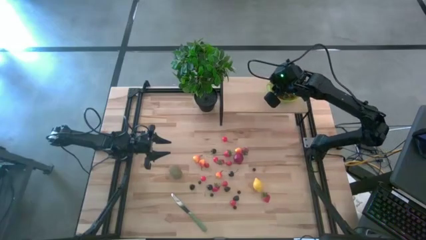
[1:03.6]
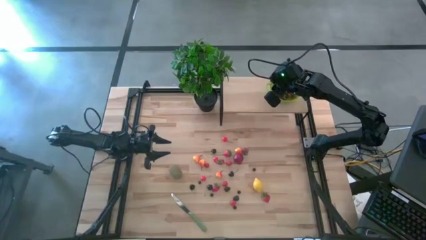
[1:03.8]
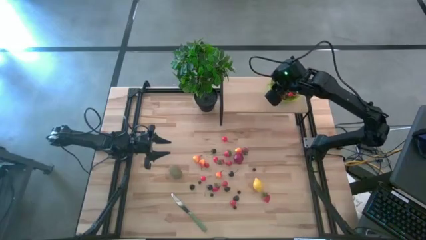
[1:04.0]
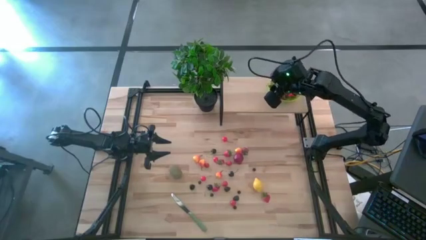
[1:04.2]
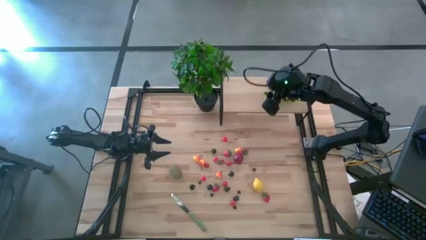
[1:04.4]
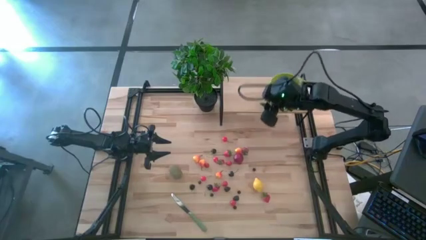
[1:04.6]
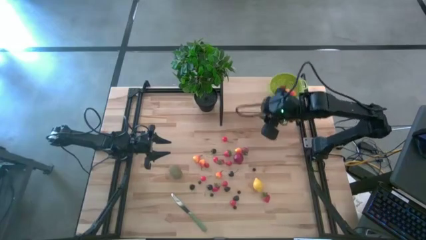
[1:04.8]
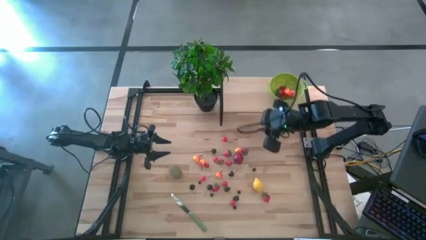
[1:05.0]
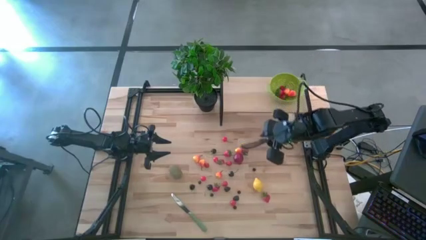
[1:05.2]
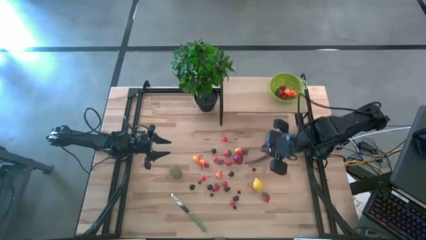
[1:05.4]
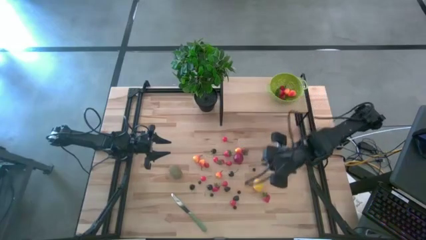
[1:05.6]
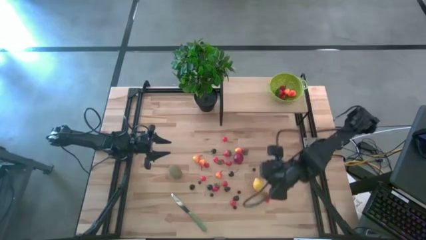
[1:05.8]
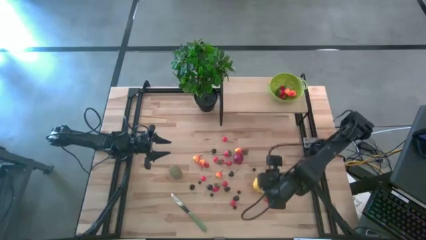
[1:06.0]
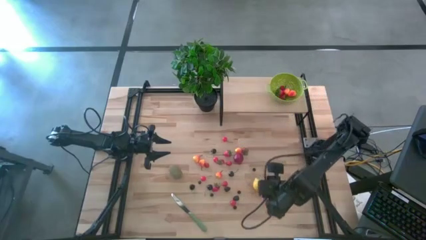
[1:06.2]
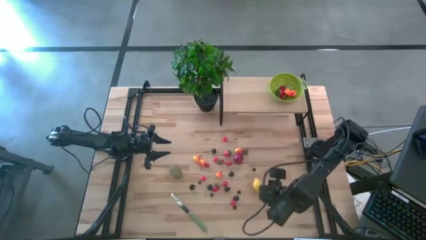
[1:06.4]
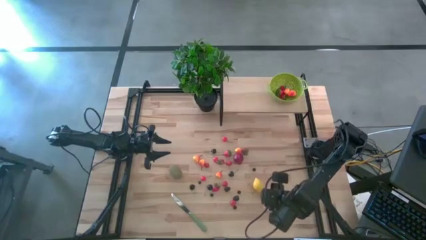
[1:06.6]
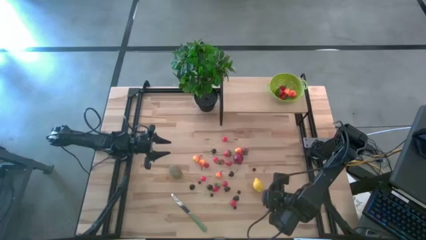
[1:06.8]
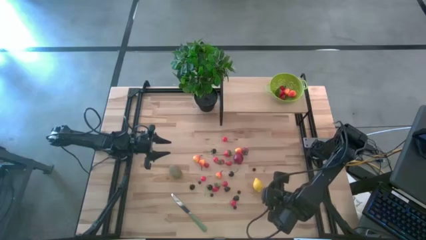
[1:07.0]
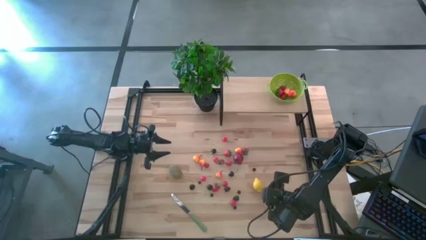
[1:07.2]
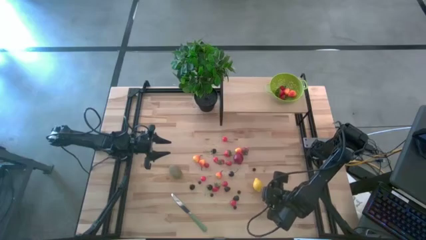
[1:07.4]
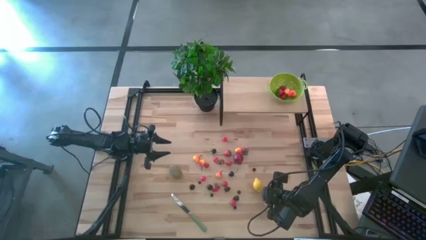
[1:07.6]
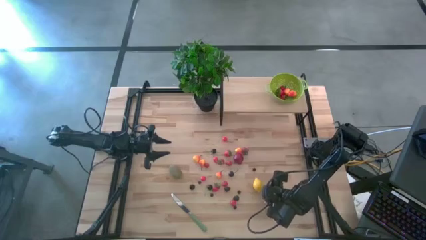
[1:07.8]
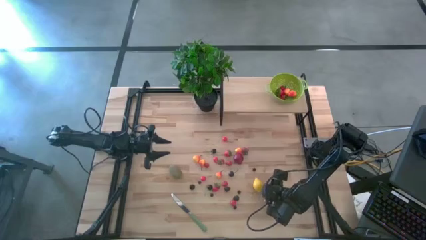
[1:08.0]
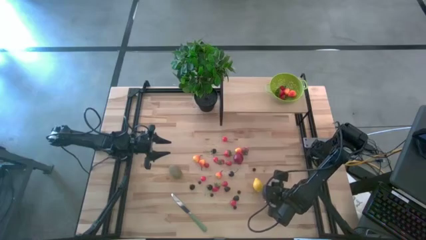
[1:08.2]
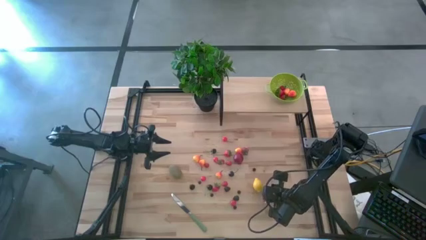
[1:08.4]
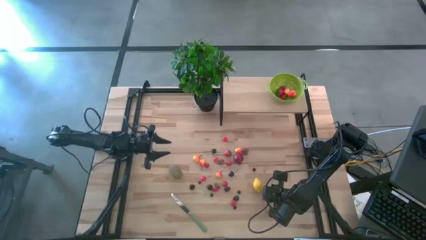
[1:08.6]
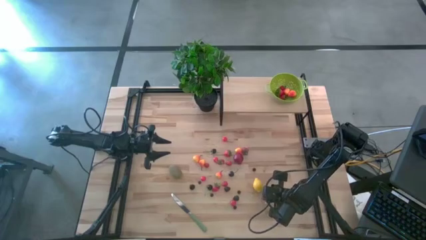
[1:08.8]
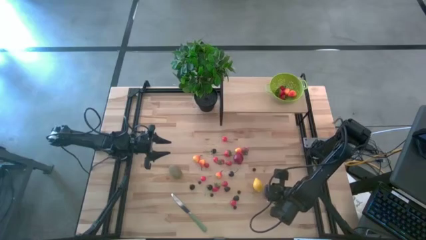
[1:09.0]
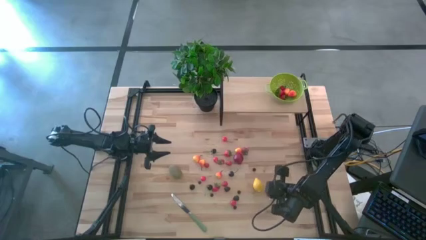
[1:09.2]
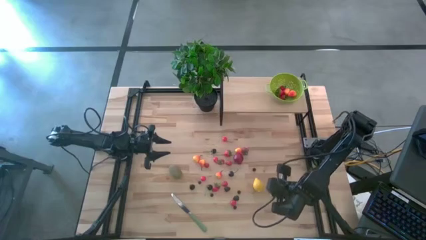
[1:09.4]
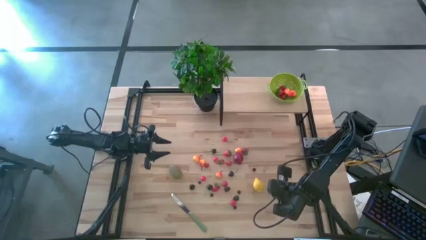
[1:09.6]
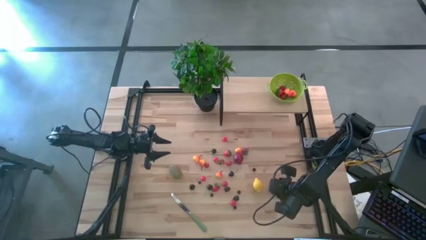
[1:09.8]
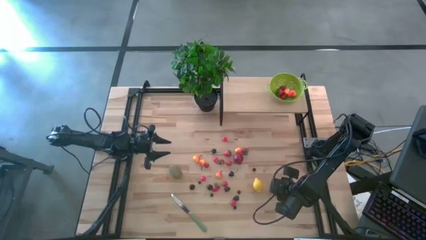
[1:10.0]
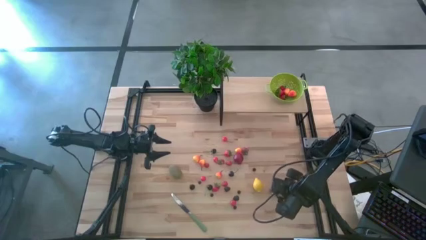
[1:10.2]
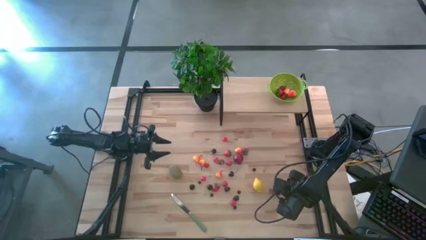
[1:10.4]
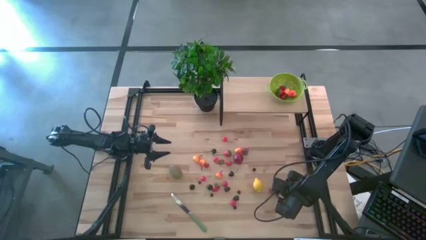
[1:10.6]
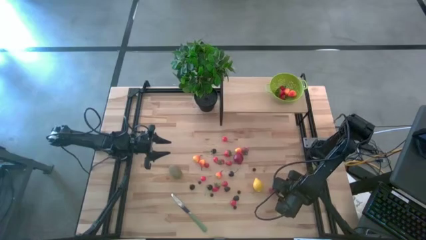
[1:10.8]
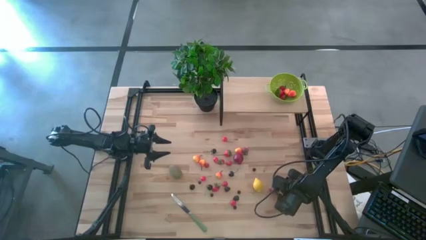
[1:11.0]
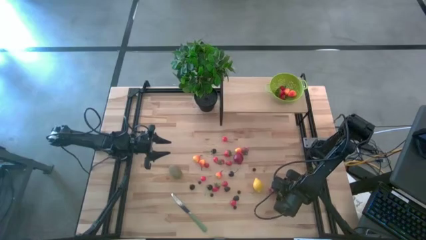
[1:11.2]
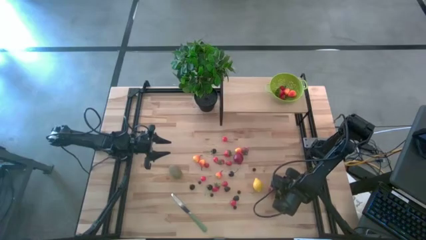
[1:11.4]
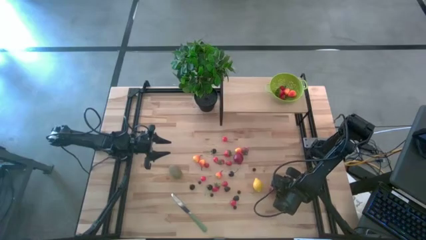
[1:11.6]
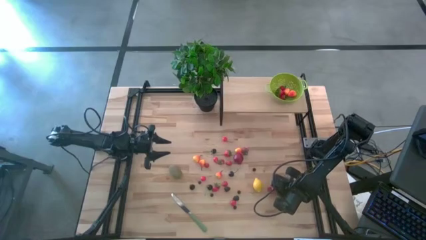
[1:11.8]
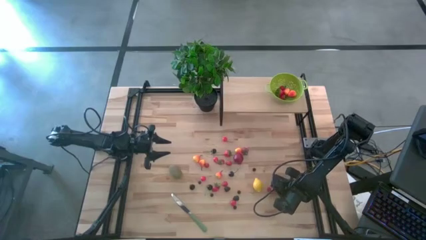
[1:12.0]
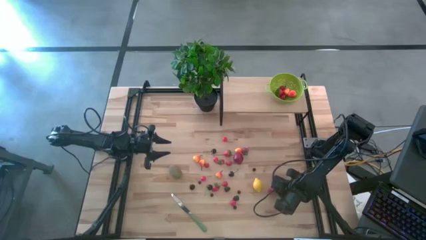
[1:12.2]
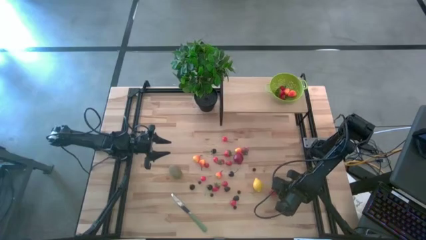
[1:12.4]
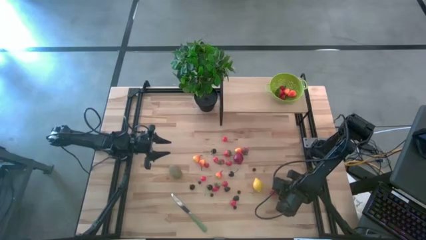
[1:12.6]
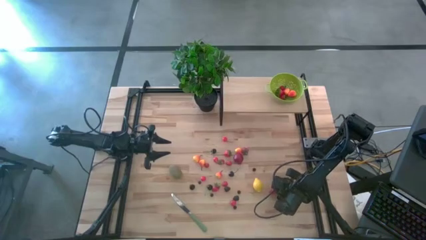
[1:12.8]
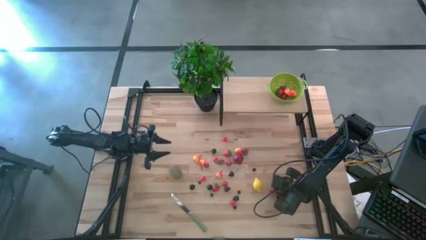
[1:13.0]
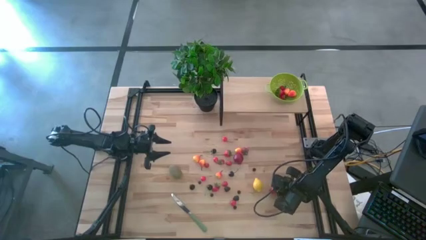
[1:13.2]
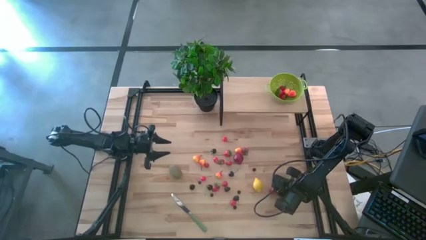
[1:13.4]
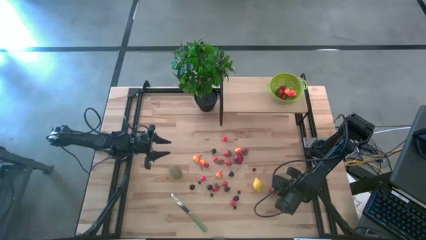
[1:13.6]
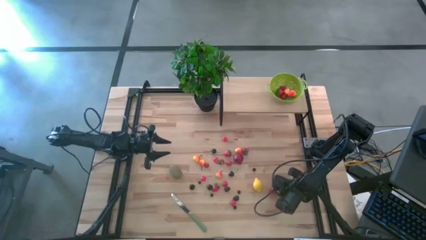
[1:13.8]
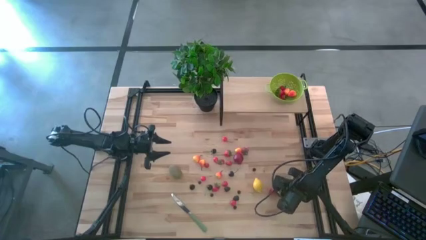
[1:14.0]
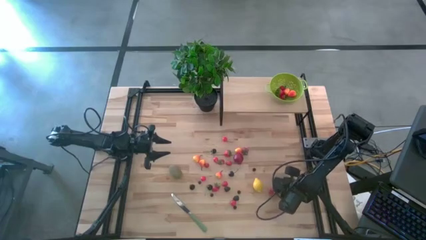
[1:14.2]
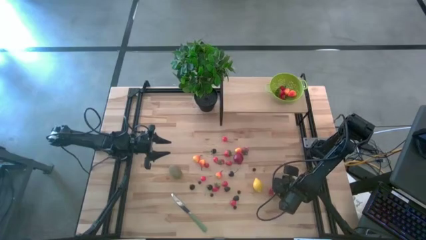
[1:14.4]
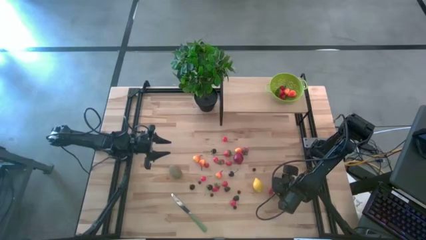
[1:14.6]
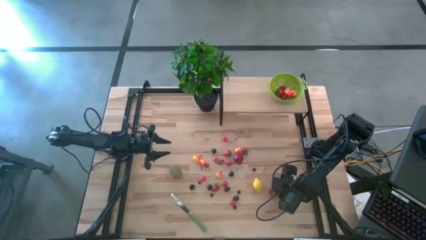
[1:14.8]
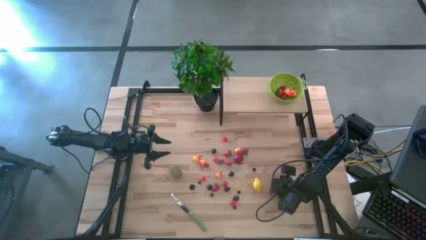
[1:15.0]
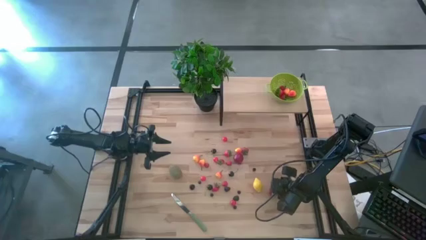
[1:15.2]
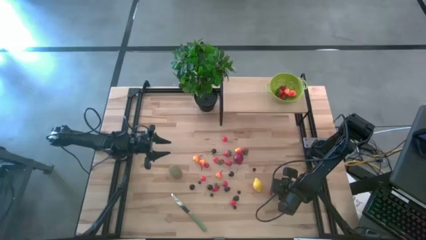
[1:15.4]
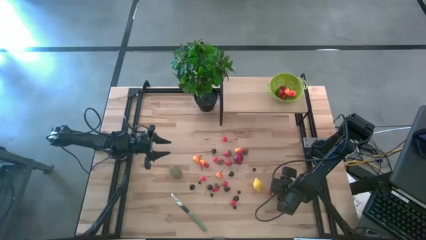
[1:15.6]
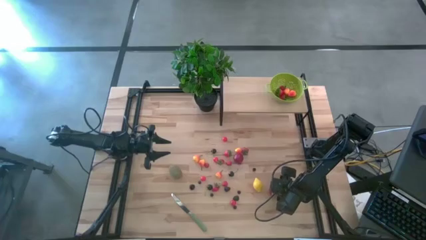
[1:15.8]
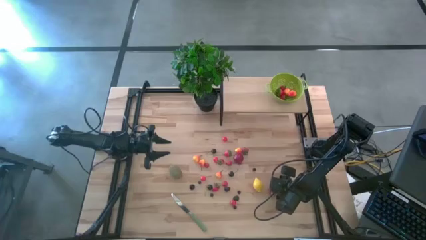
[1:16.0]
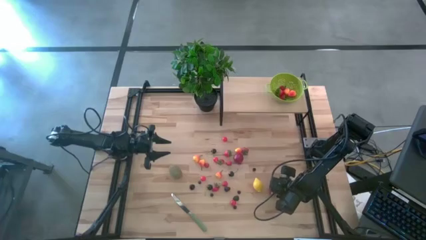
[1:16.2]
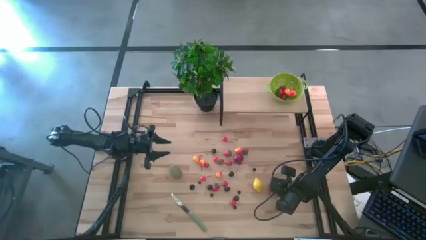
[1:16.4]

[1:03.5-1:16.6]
Task: Pick & Place Fruit
Put the strawberry into the green strainer bowl on the shelf

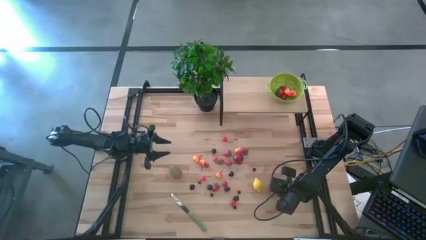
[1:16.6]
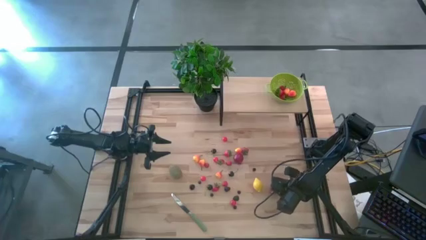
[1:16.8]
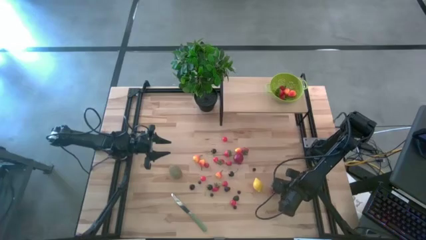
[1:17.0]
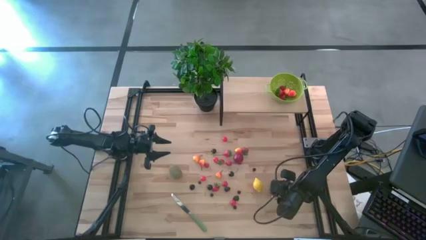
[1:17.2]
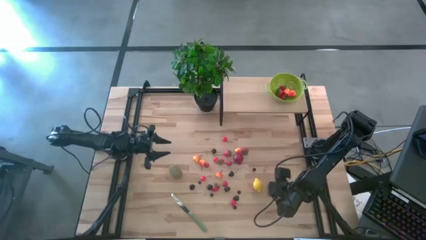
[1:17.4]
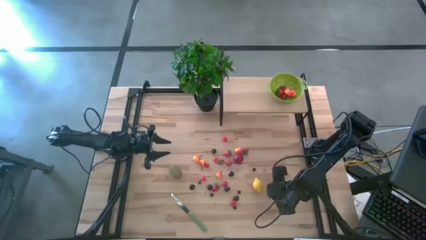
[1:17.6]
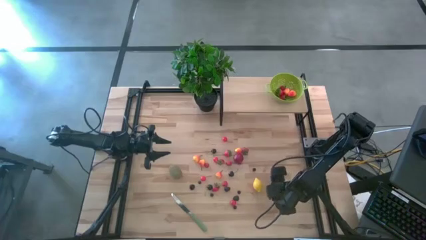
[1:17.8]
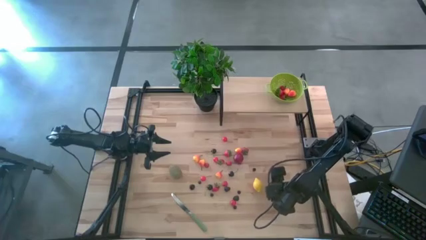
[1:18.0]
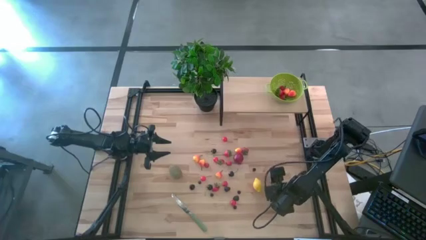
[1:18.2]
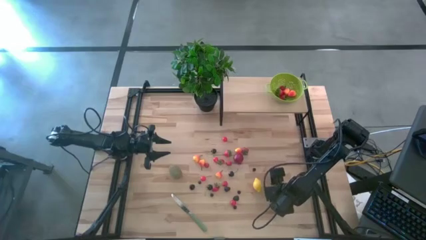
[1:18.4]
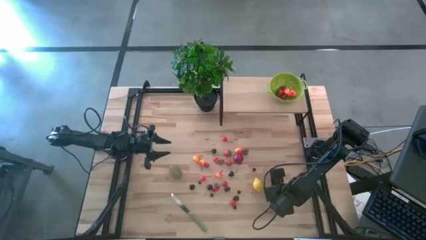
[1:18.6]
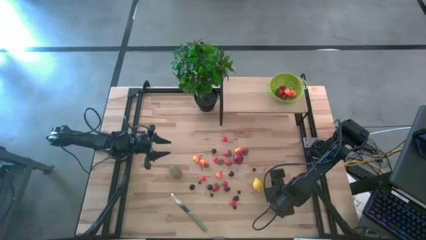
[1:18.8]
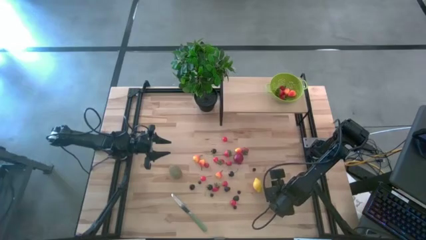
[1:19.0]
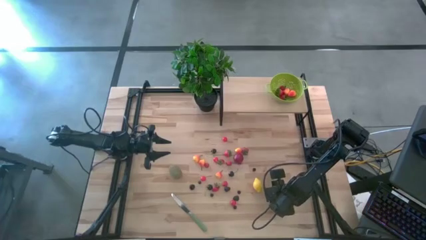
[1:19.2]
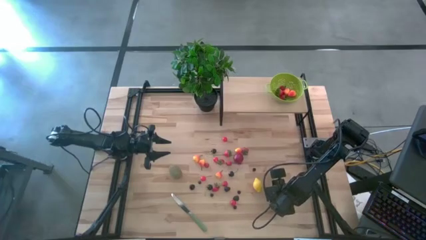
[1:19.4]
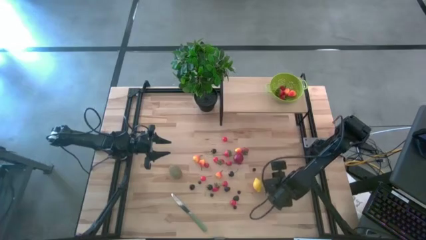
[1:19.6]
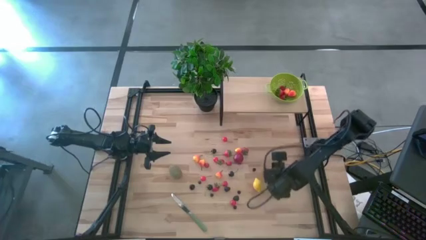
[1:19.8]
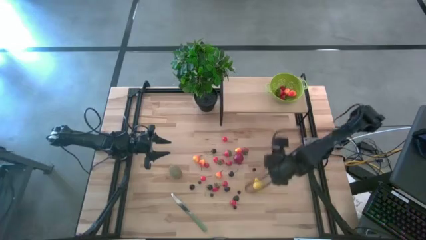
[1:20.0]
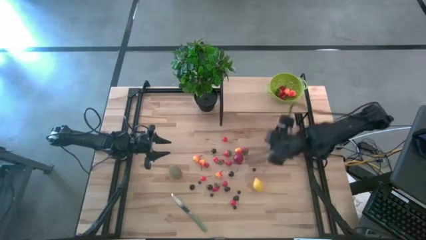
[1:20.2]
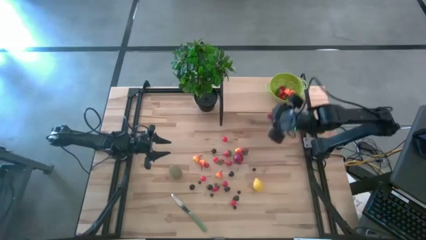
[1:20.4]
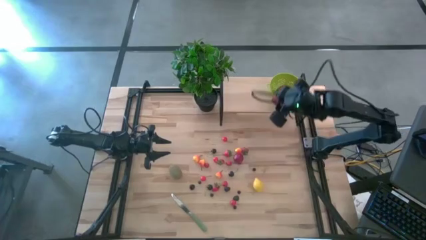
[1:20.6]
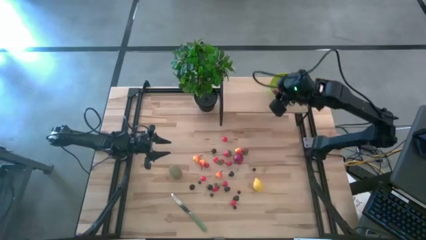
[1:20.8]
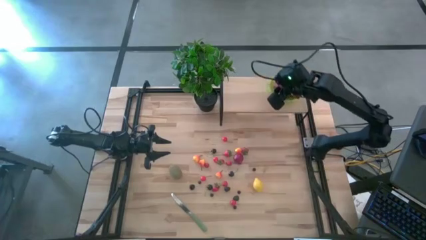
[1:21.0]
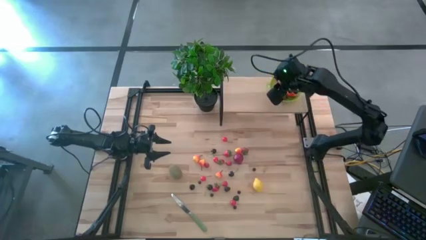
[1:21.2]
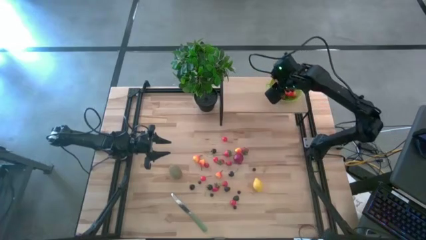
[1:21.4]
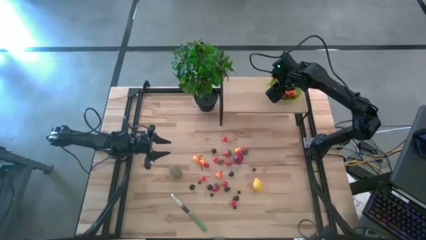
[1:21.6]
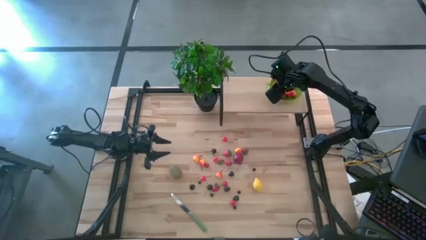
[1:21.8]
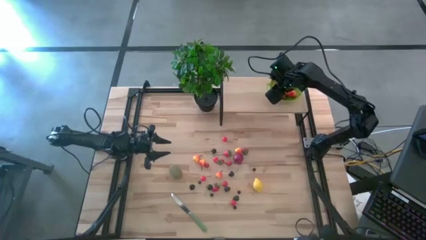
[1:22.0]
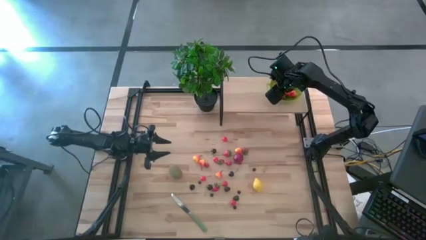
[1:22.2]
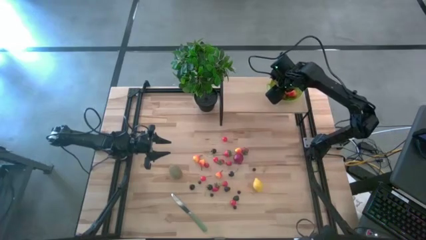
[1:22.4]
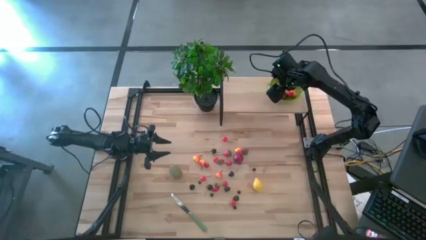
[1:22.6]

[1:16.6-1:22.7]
Put the strawberry into the green strainer bowl on the shelf
